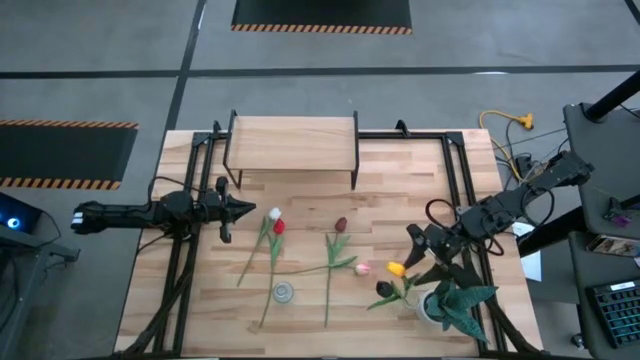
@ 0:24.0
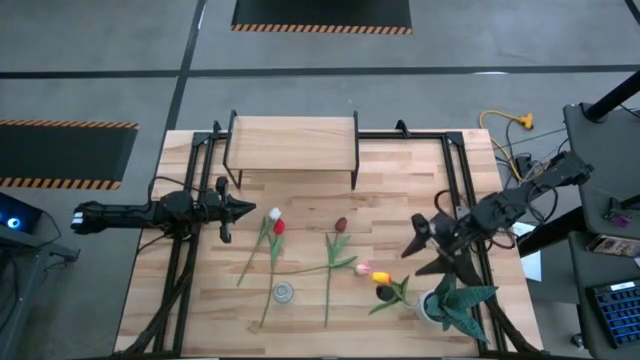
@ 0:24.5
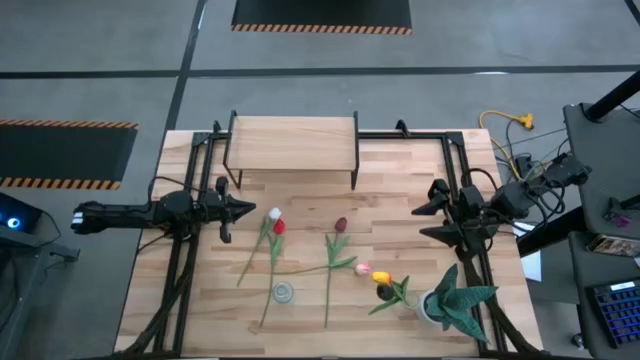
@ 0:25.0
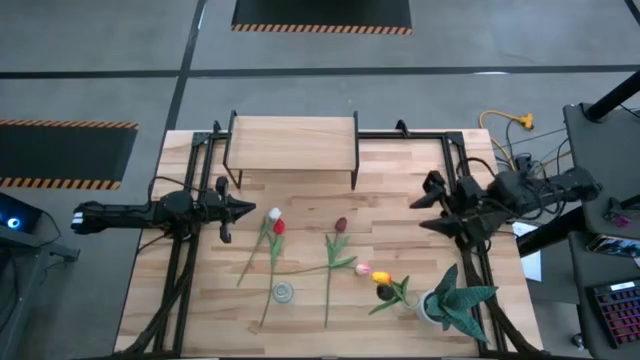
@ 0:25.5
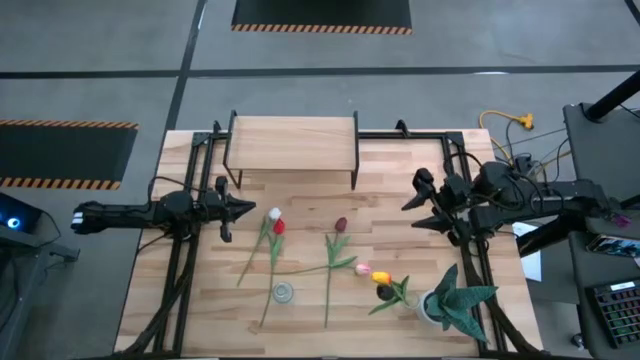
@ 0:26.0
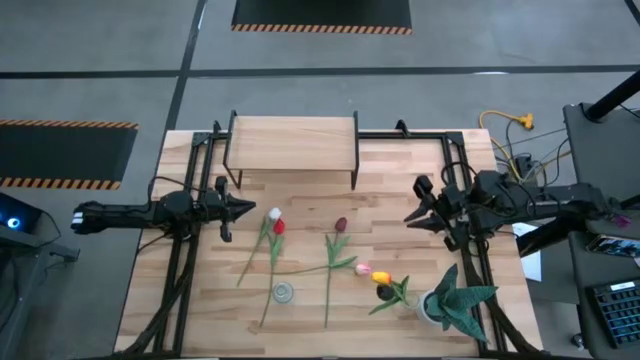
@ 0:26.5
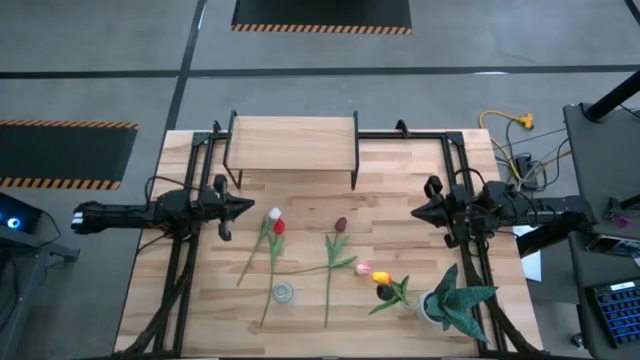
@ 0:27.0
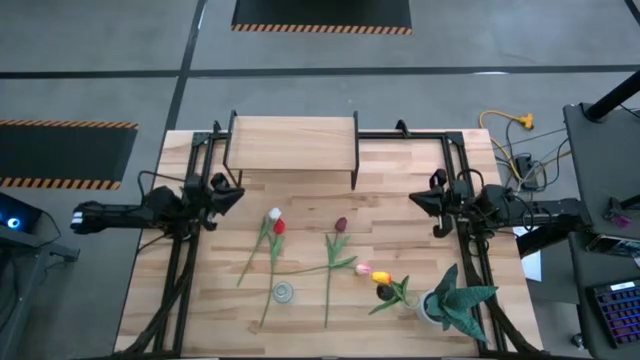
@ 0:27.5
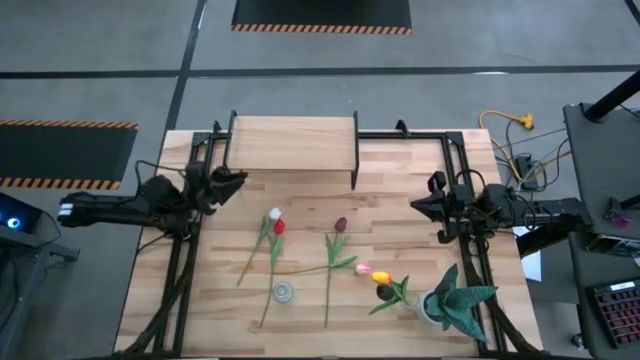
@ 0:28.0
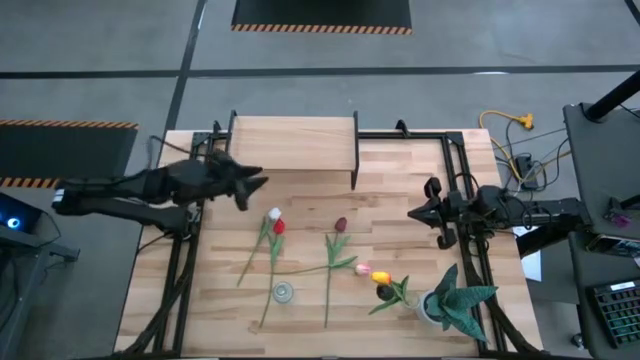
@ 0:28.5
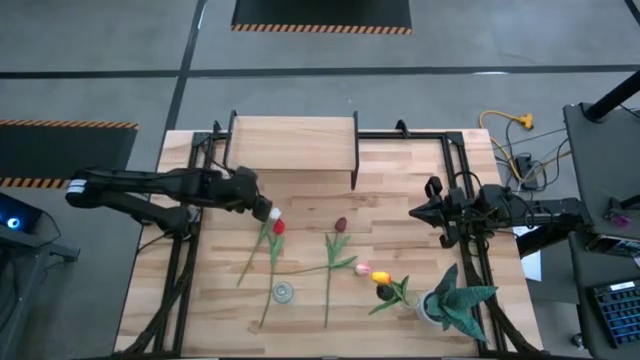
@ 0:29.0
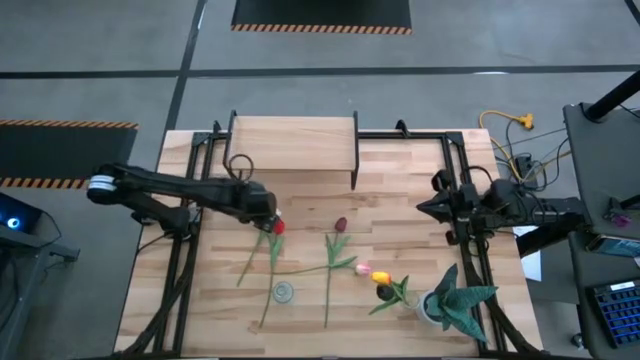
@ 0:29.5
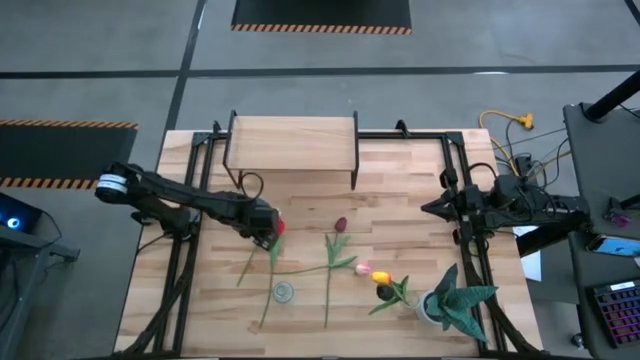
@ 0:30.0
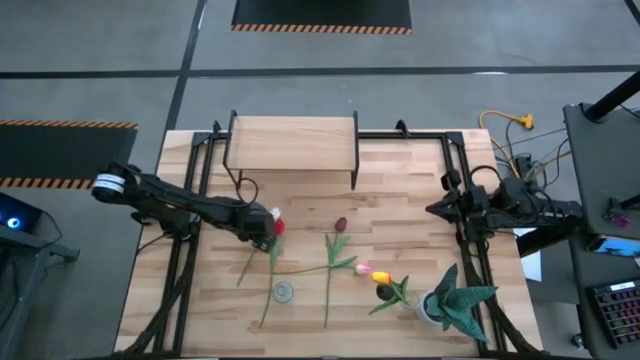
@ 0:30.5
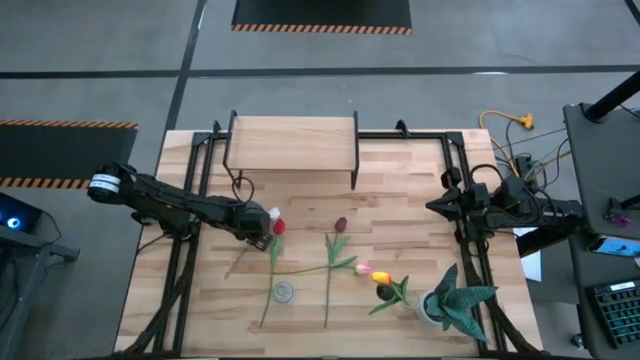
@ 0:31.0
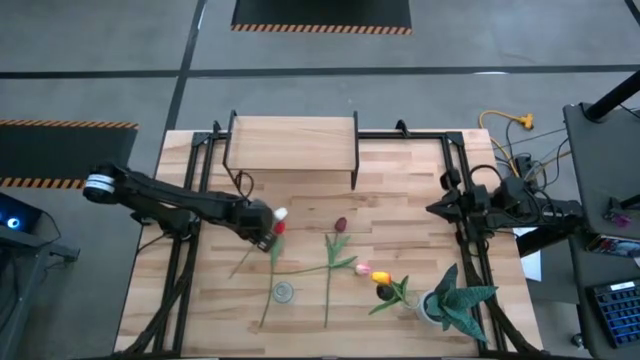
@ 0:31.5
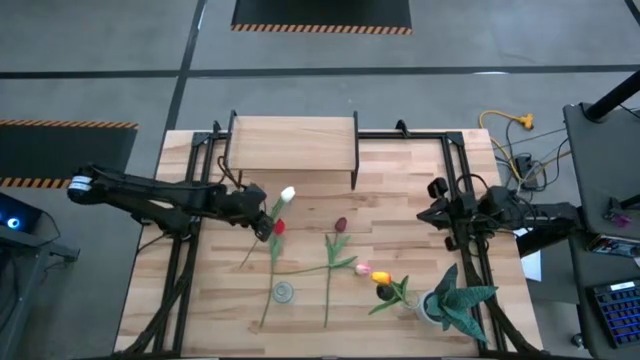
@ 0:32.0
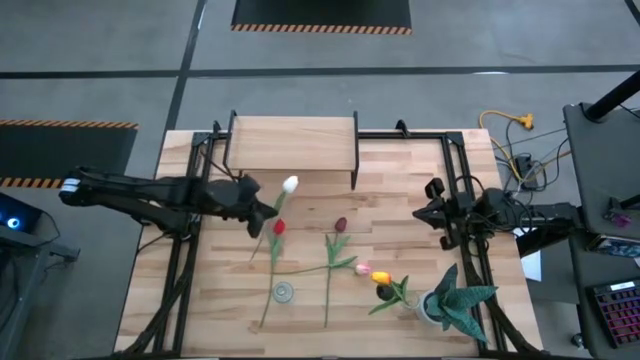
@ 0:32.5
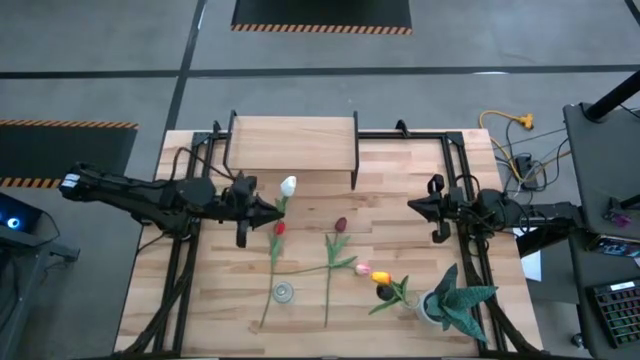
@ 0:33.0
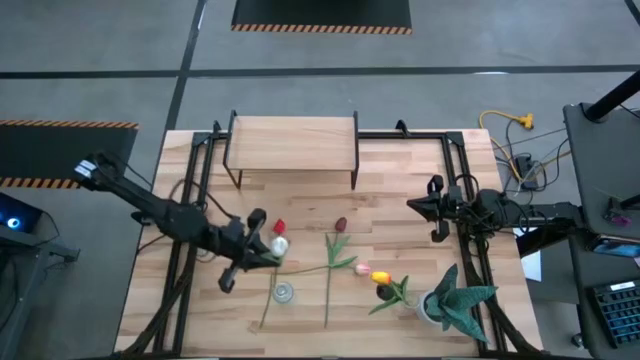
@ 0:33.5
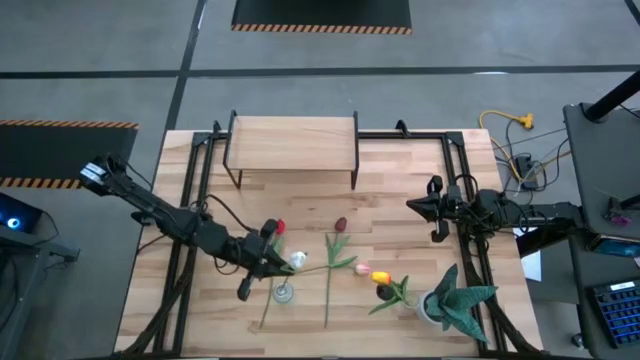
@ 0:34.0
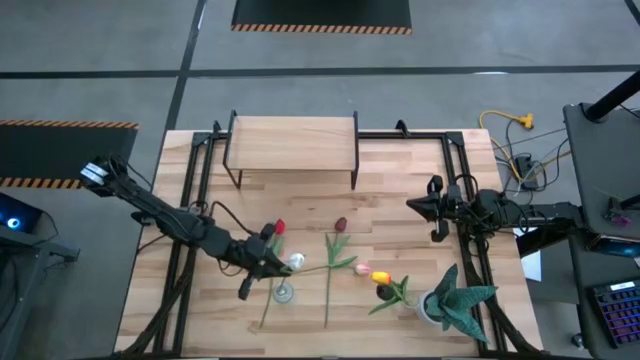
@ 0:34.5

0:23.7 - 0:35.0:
Task: Pick and place flowers into a vace then onto a shelf
Put the white flower into the left transparent vase

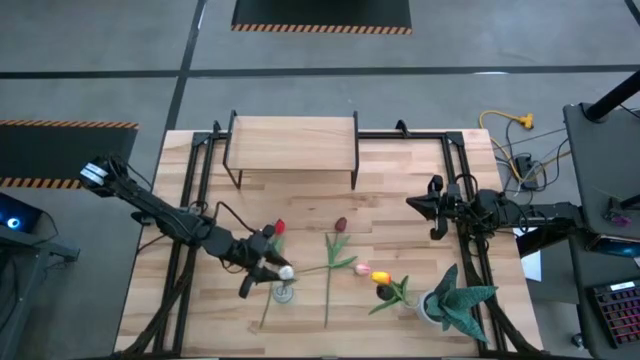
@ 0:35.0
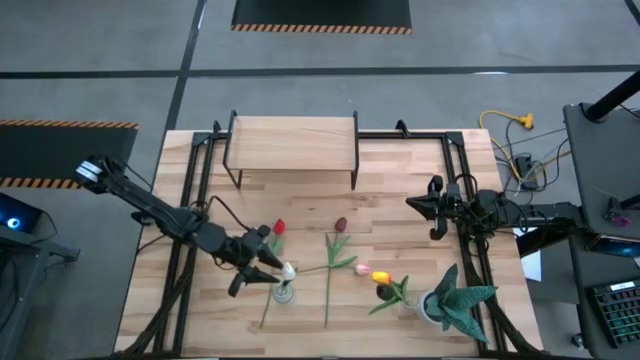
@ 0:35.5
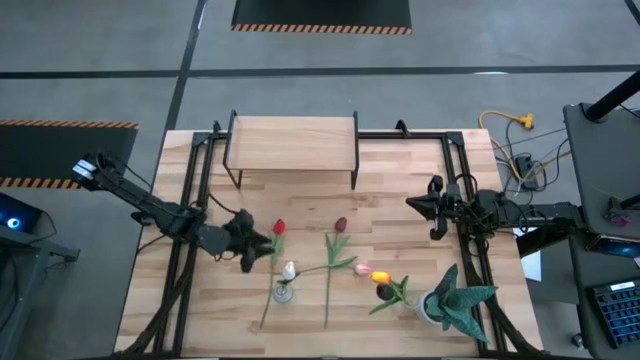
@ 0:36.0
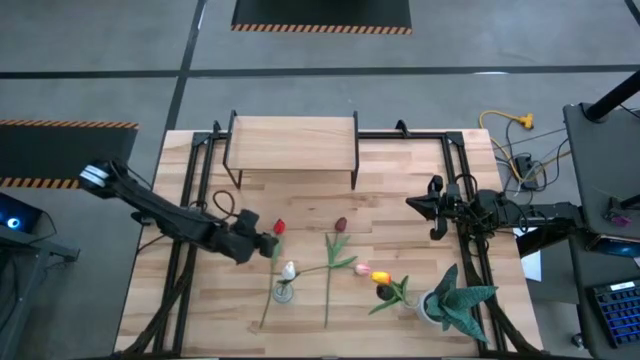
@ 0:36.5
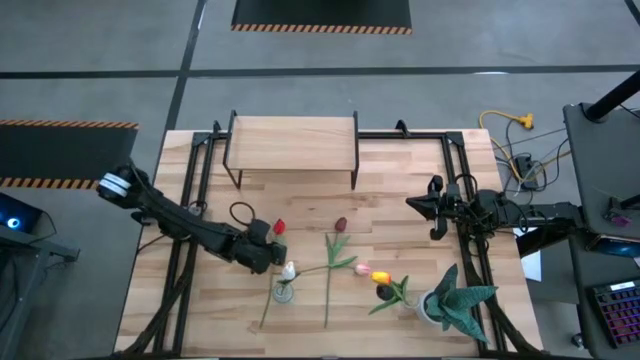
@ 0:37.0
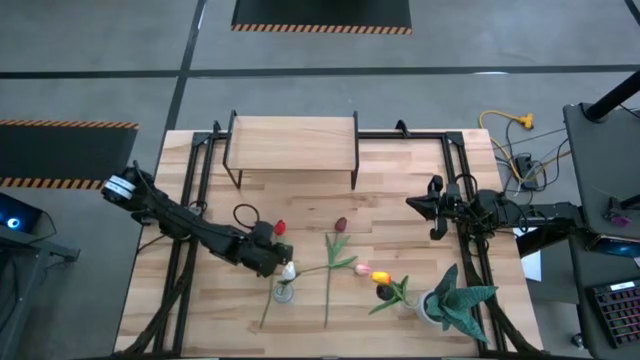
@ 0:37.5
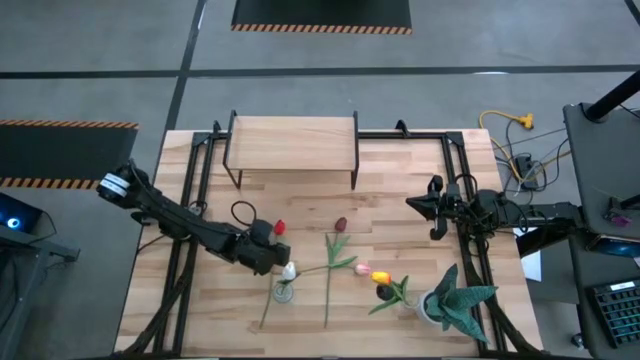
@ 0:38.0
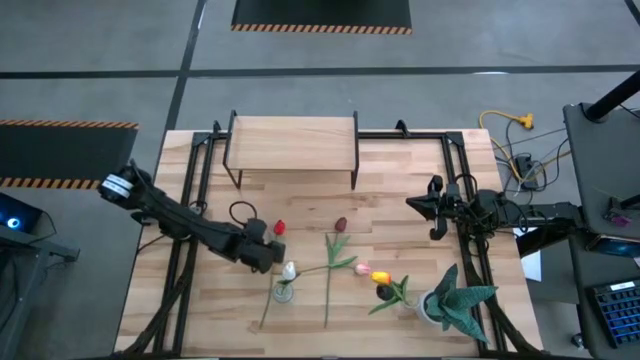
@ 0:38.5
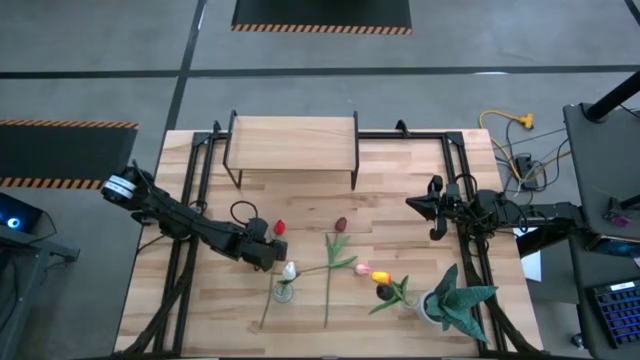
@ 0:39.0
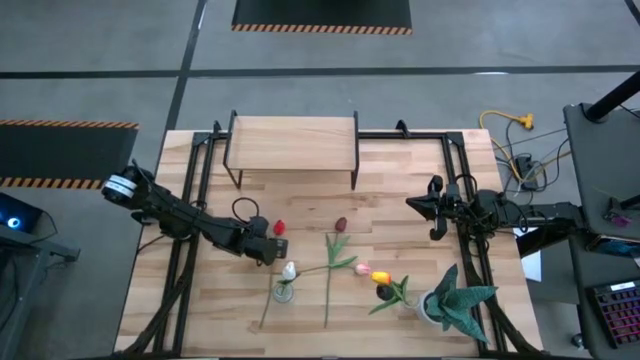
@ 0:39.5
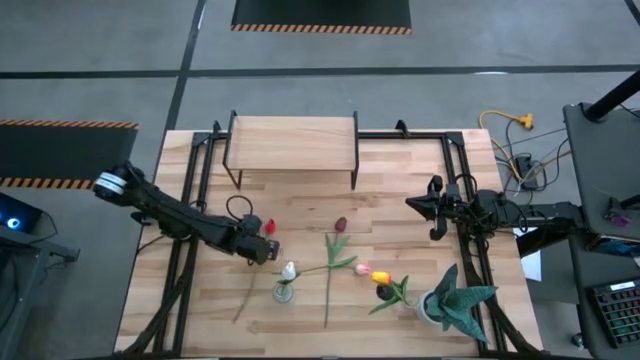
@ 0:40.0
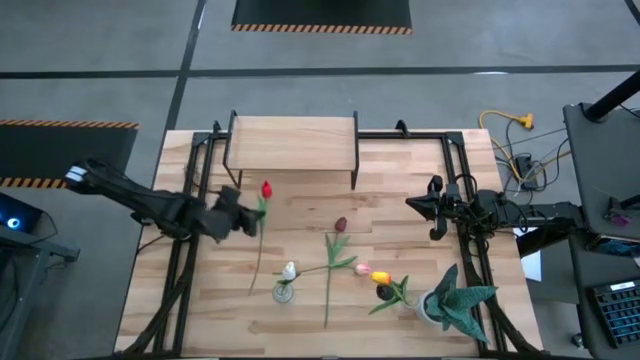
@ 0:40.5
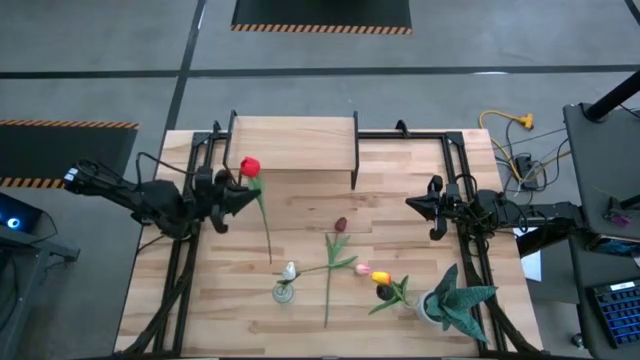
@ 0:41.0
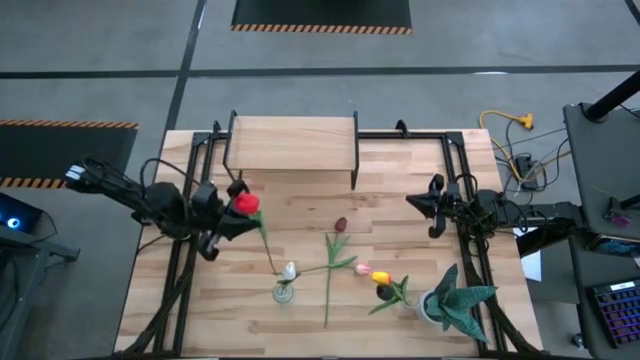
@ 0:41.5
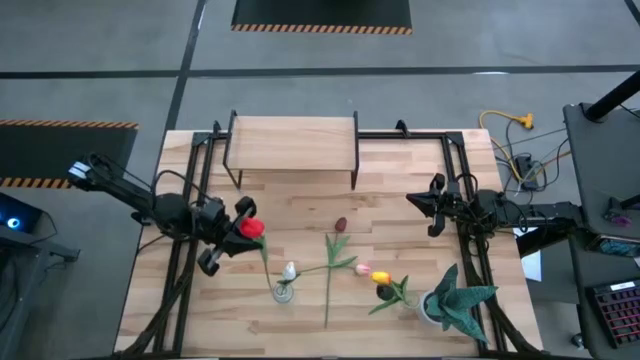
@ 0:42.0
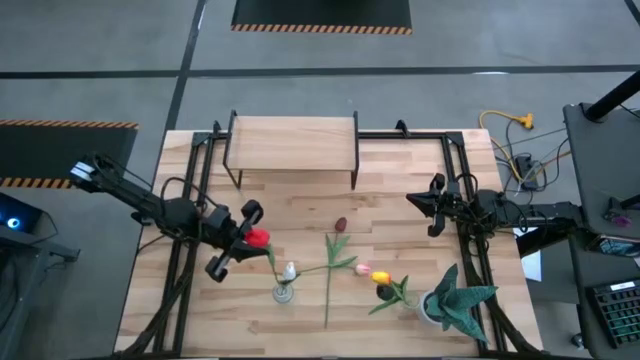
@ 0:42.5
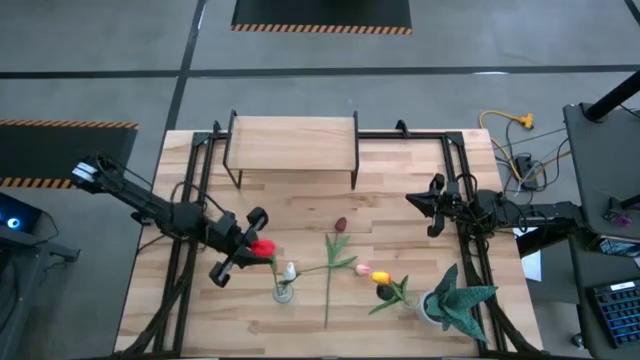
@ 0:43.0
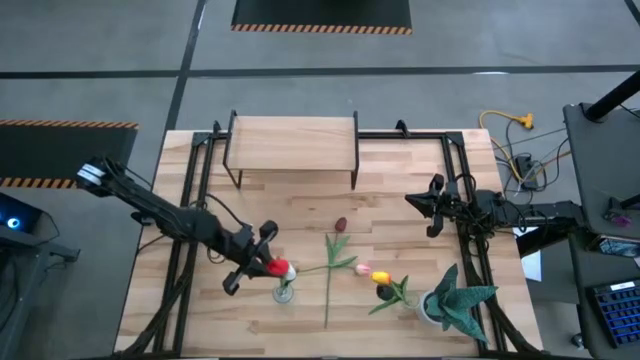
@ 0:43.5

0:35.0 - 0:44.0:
Put the red flower into the left transparent vase

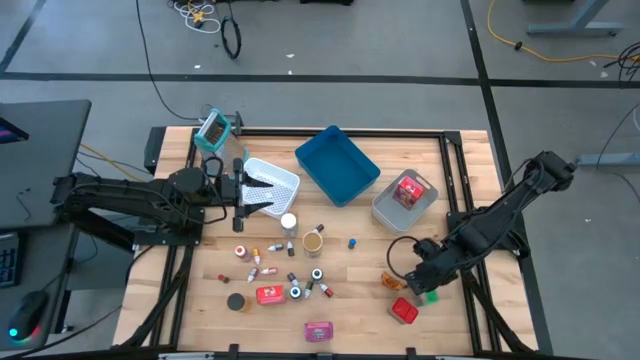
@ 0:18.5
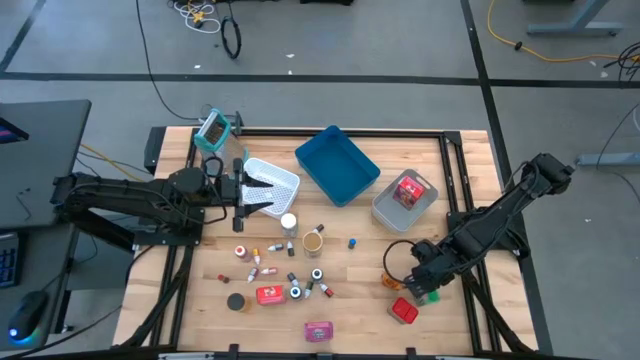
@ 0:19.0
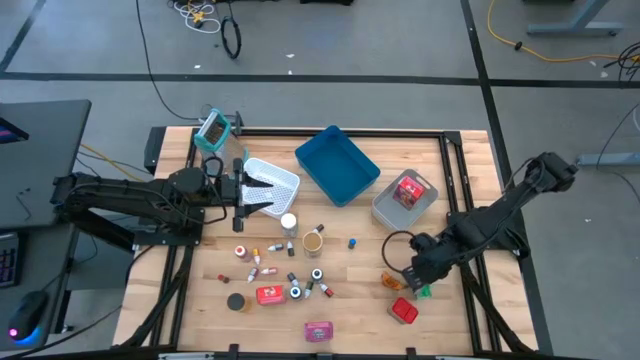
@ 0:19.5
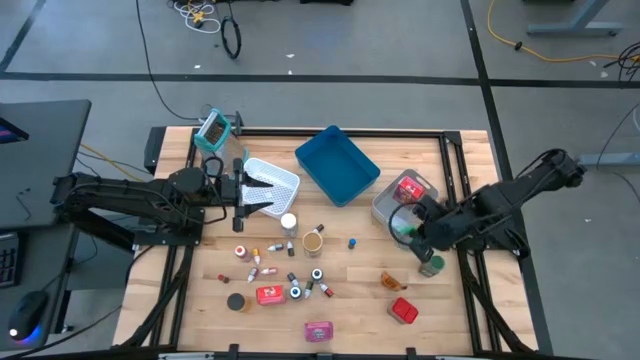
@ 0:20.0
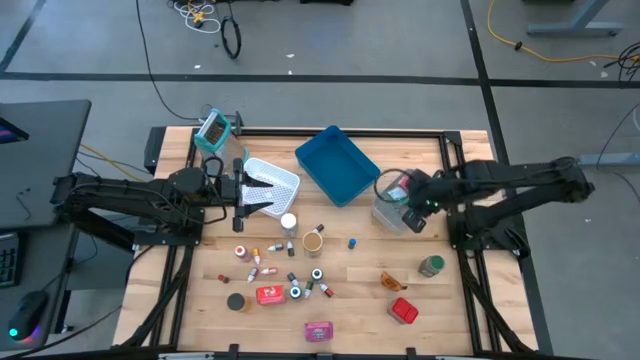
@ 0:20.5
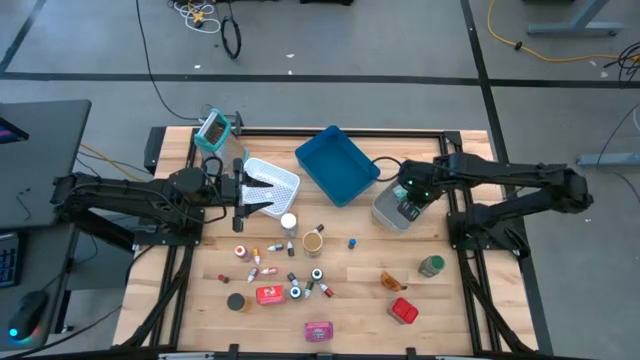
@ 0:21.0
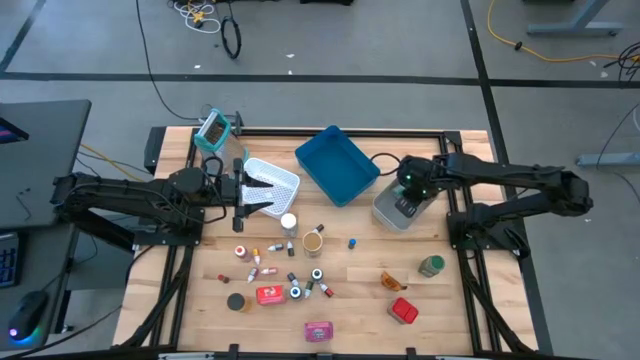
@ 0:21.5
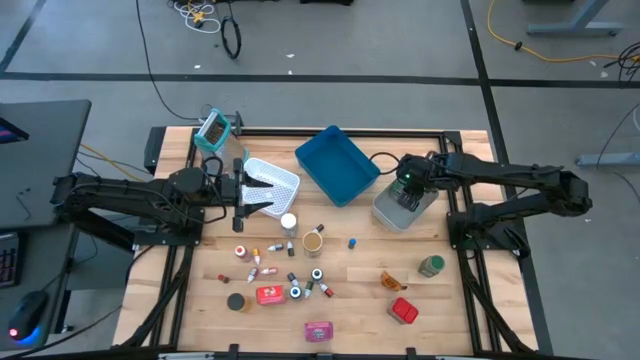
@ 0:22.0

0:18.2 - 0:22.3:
Task: Pick & Place Kitchen Items
Put the green cereal box into the gray bin
